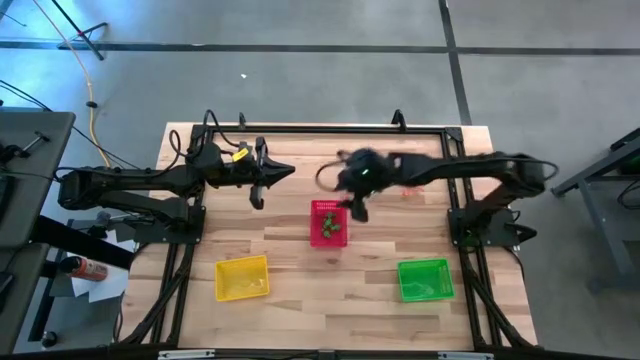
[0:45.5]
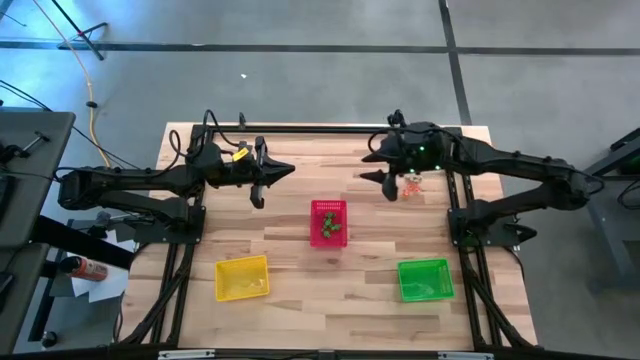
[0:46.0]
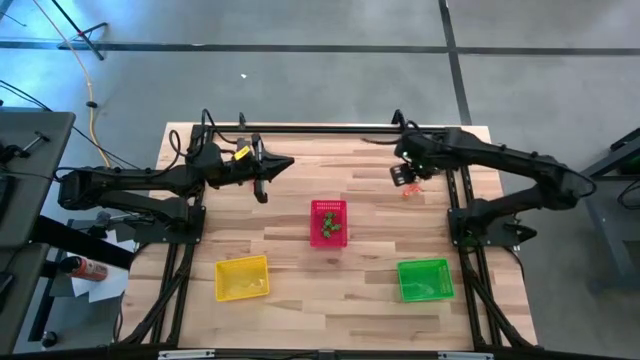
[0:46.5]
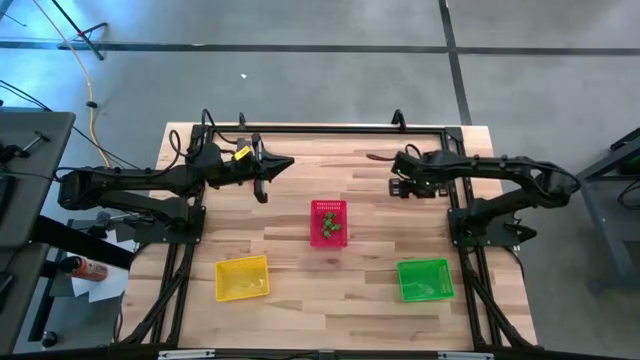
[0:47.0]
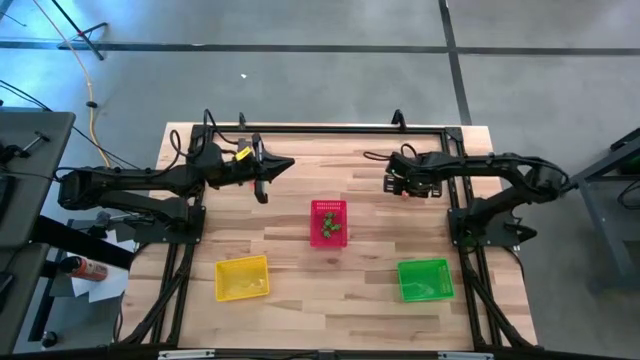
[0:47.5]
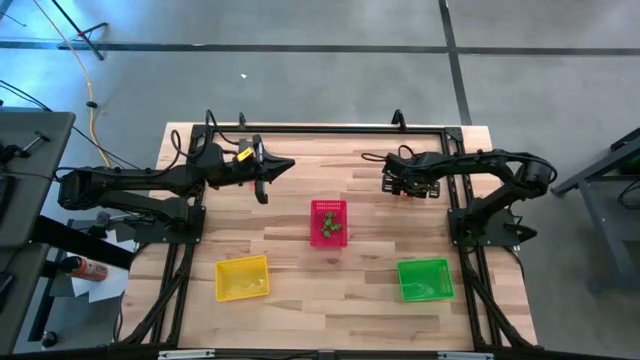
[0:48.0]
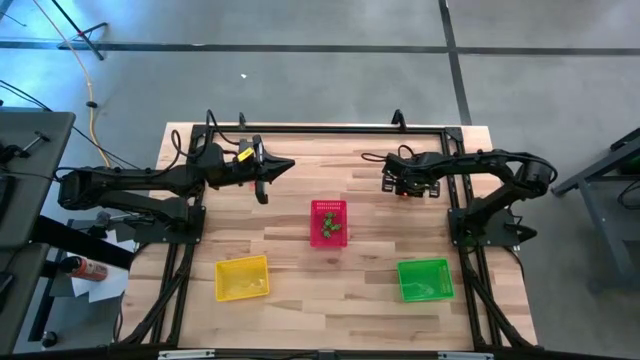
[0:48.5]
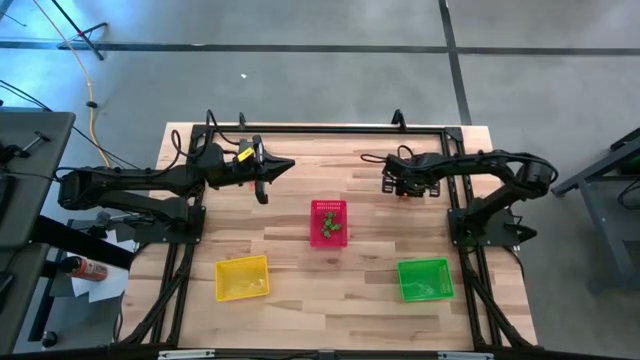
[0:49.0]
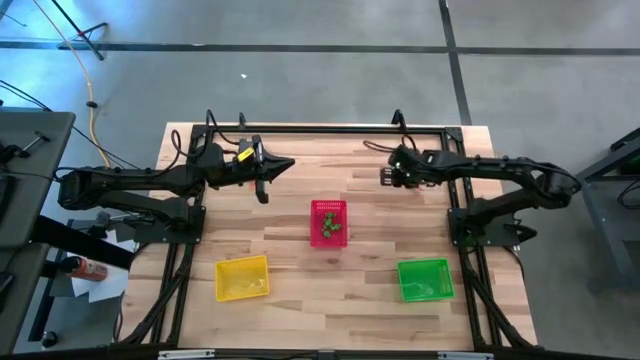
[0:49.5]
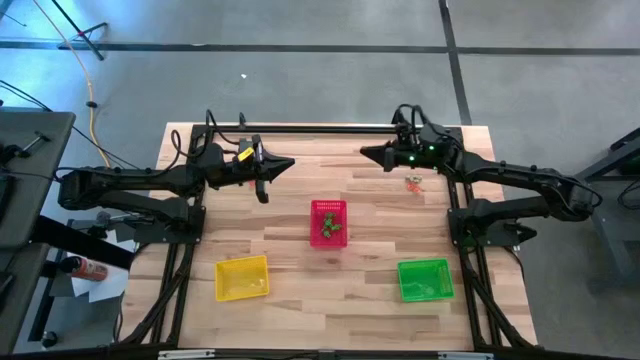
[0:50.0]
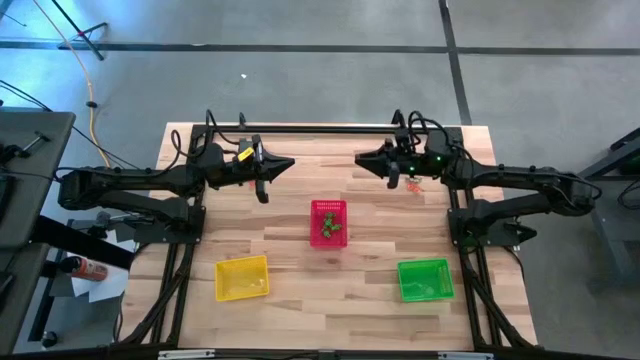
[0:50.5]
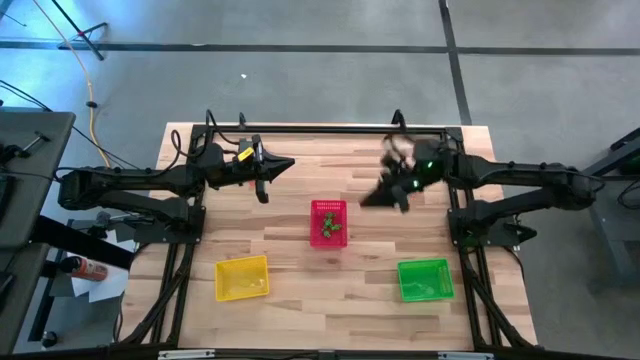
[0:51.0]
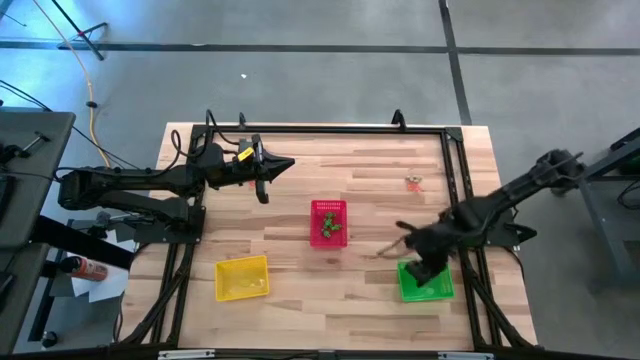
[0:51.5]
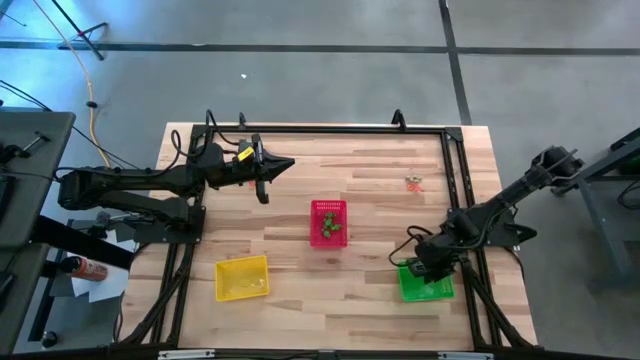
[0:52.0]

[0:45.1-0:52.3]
Task: Sort Halloween decoration
Put the orange pumpkin toy into the green bin

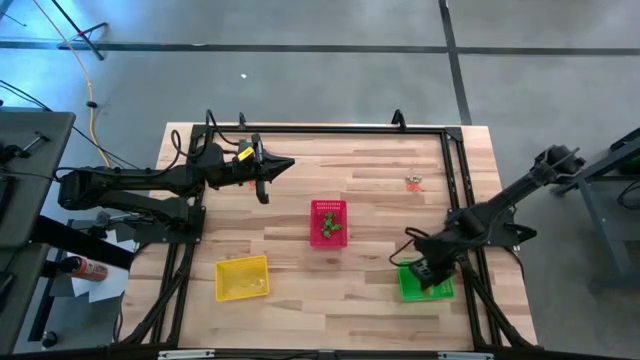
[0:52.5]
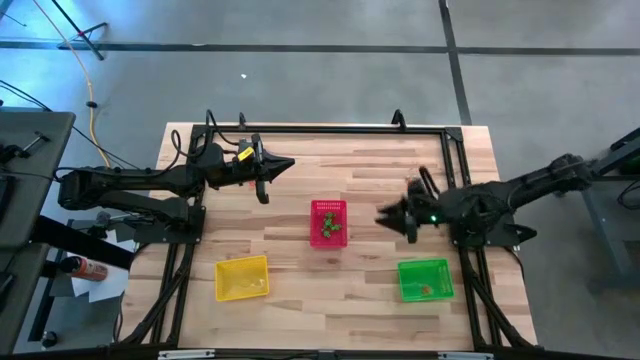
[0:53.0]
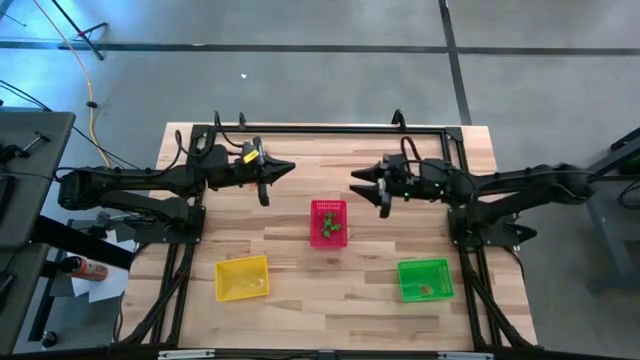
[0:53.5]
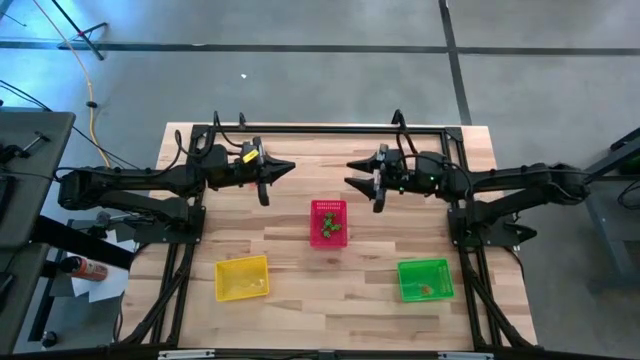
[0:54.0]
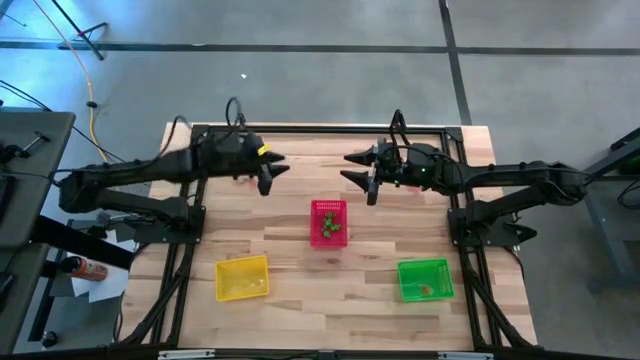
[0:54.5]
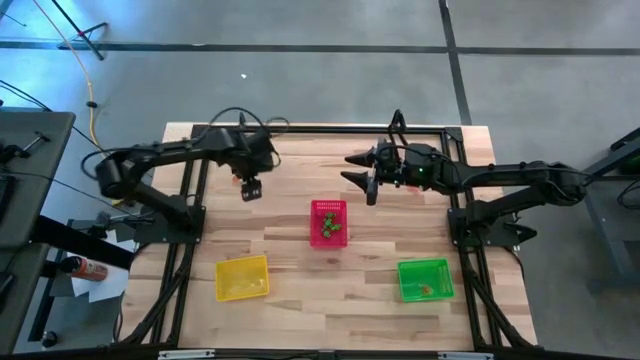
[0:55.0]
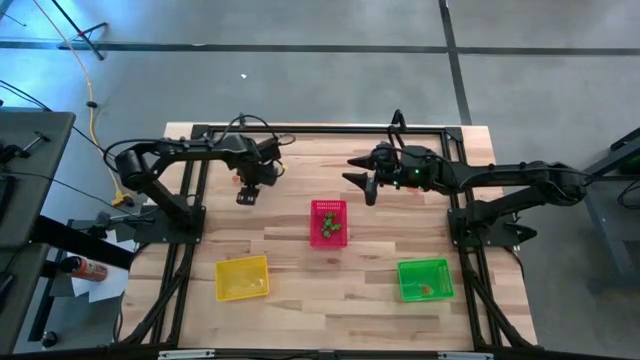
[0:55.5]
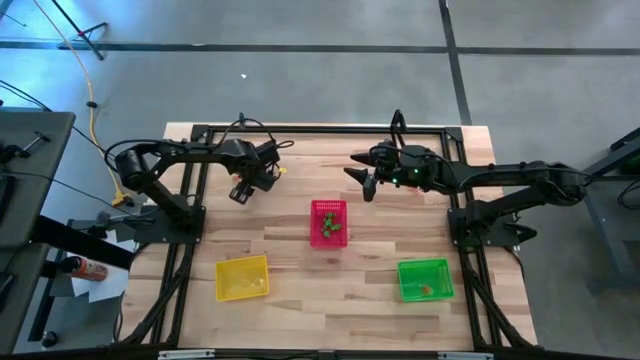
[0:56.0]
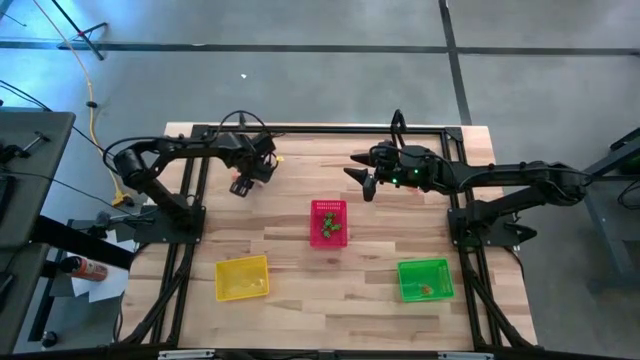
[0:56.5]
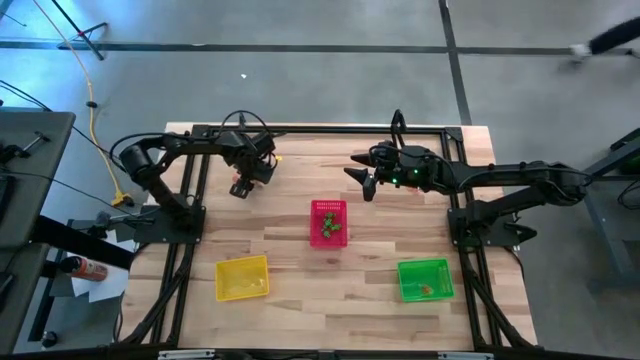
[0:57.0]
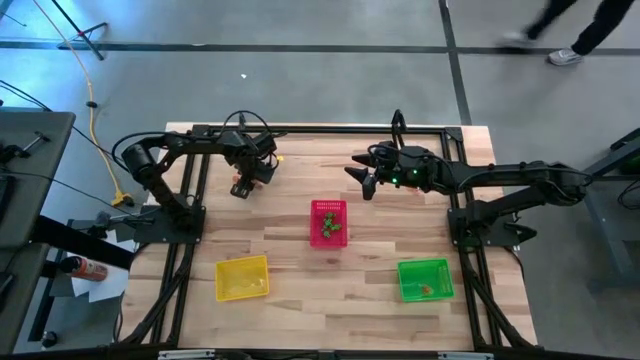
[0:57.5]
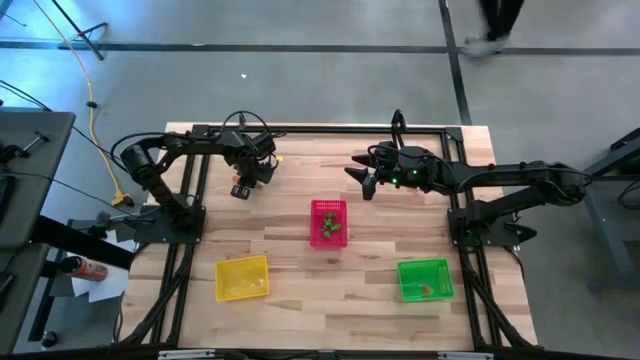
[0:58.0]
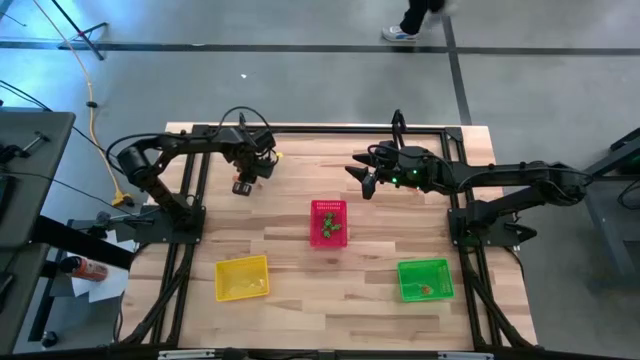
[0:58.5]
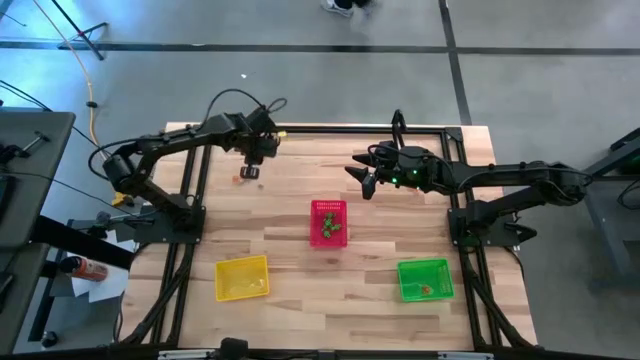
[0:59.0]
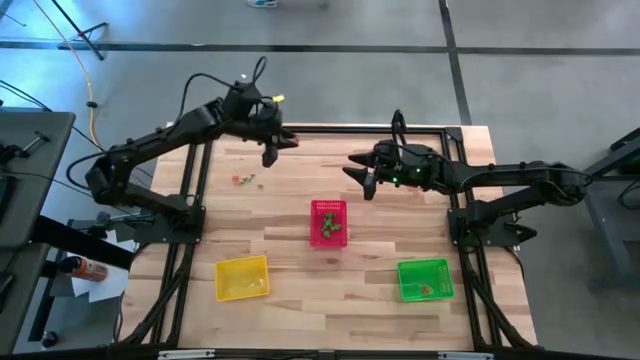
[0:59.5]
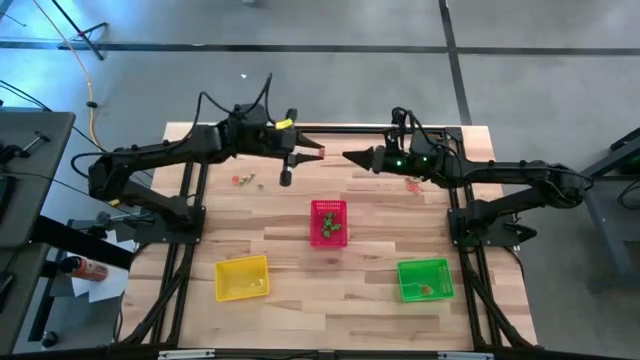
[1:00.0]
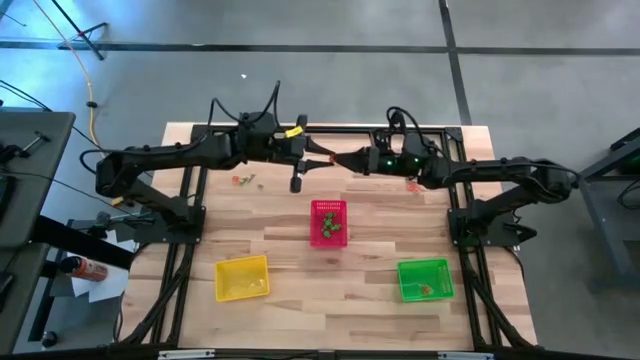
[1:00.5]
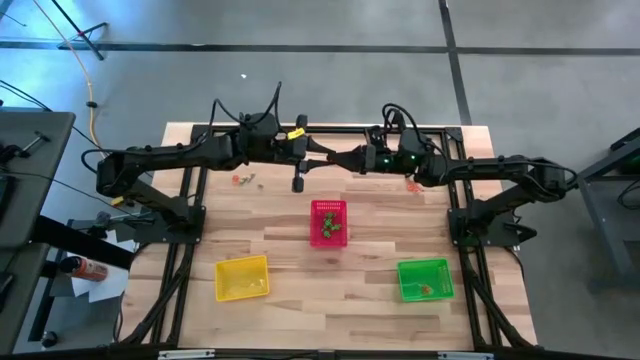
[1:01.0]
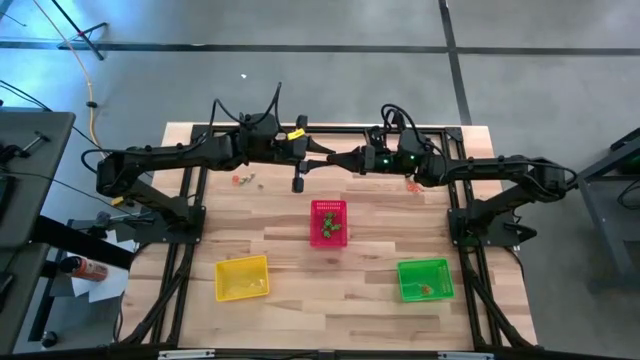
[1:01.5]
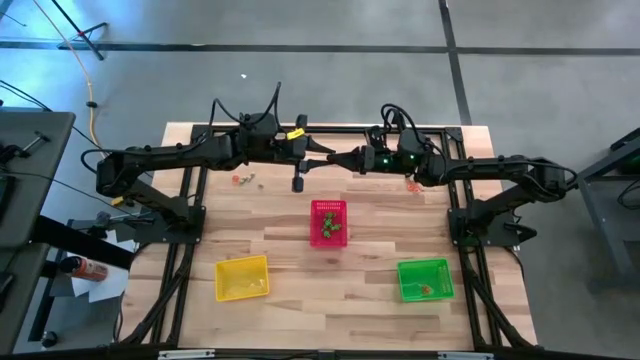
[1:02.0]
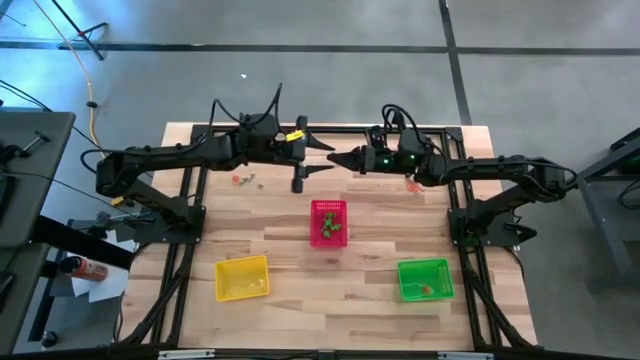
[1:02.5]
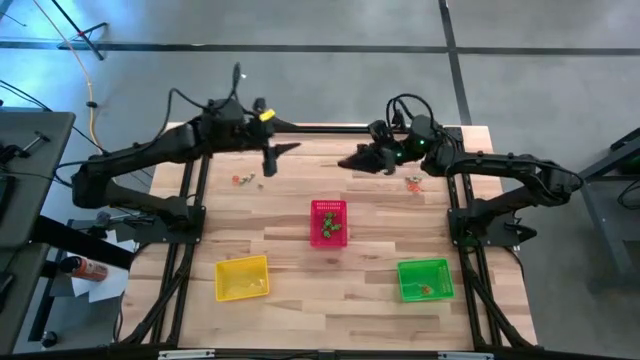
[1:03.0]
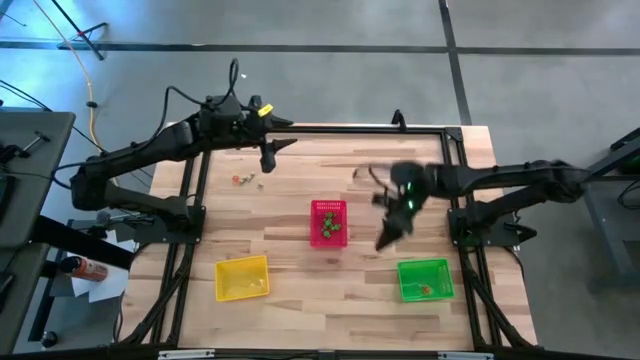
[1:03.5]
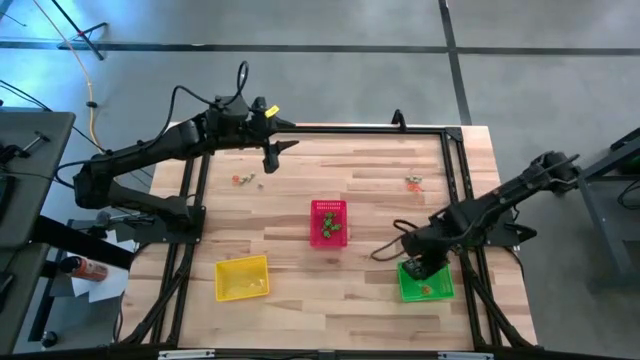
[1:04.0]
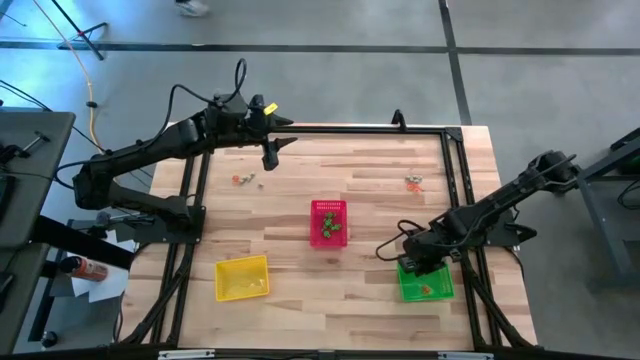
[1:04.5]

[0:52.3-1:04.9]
Put the orange pumpkin toy into the green bin

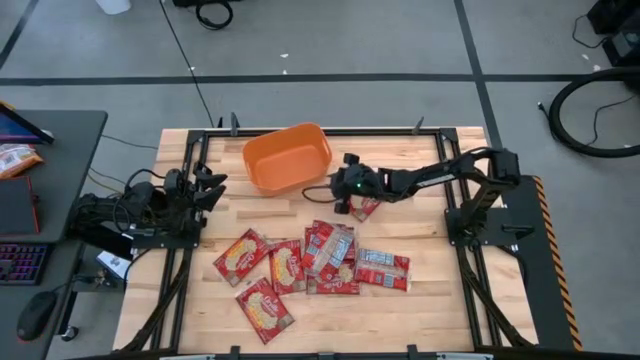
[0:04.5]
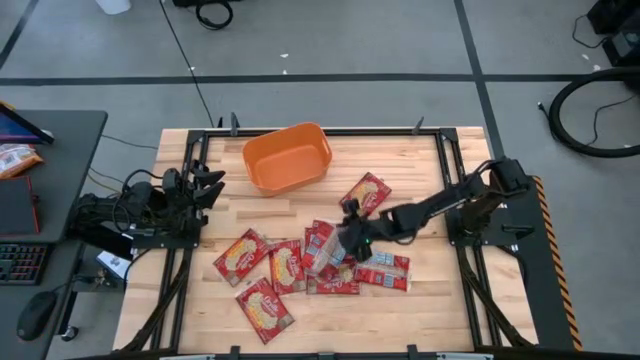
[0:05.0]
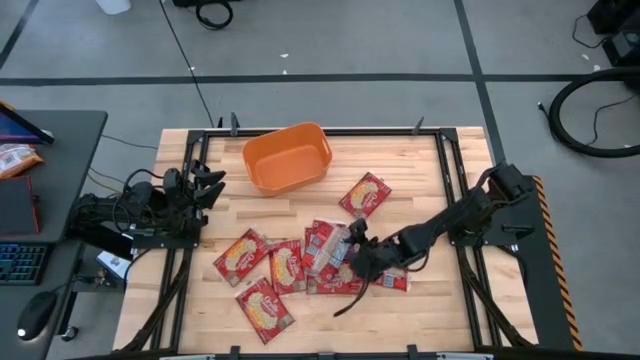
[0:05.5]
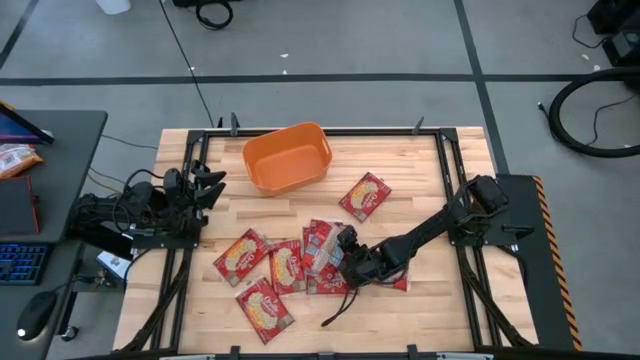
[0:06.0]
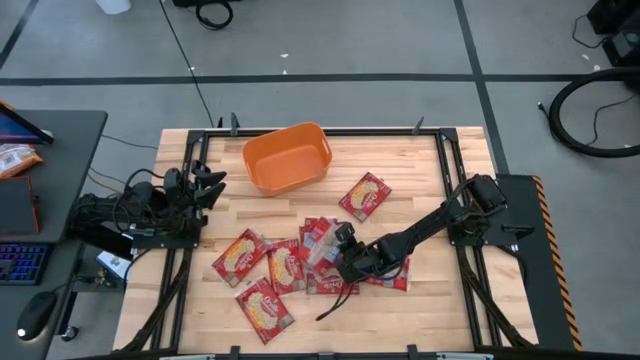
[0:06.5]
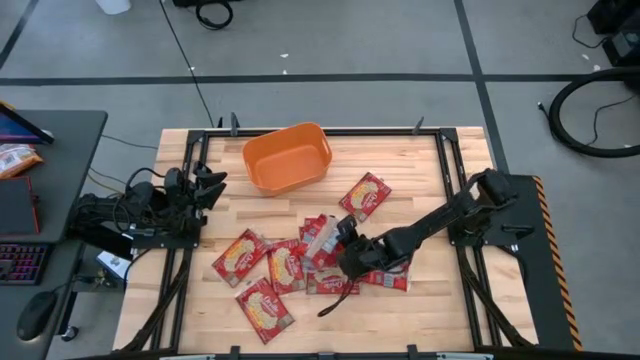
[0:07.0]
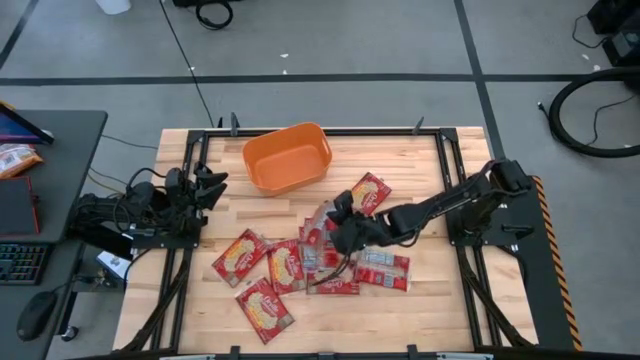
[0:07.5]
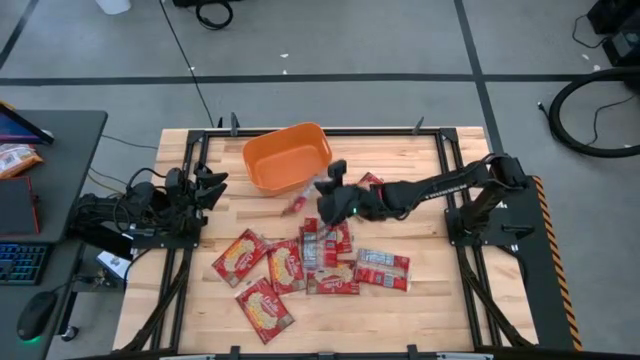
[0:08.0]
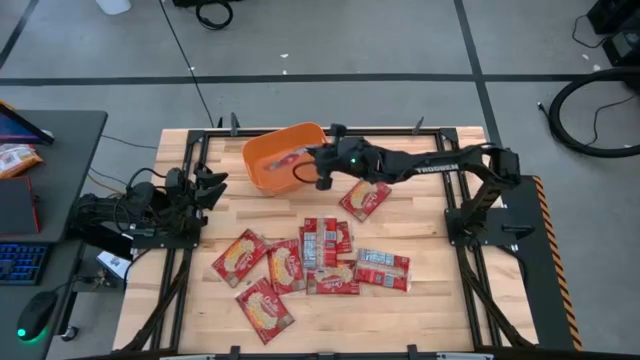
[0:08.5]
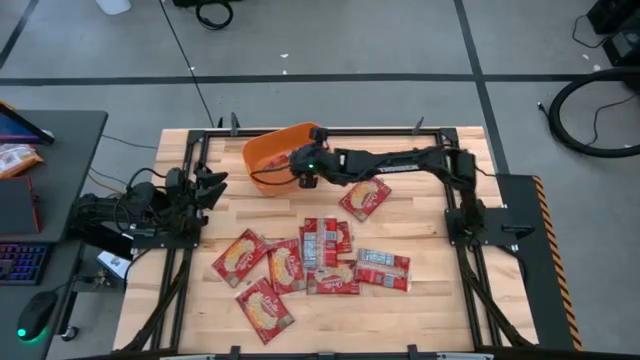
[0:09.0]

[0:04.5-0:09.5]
Task: Sort popcorn bags into baskets
Put the red popcorn bag into the orange bin
